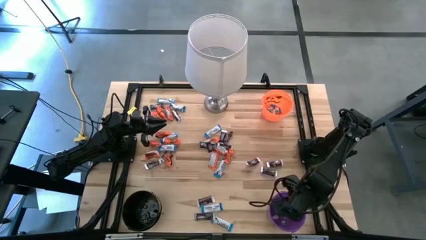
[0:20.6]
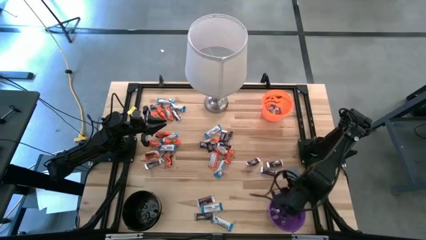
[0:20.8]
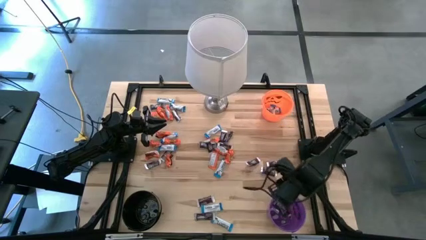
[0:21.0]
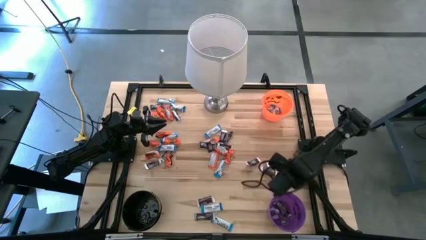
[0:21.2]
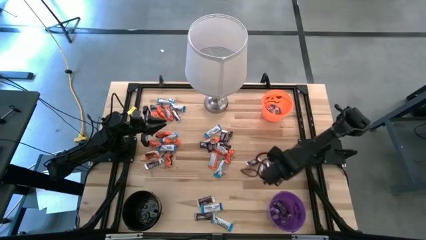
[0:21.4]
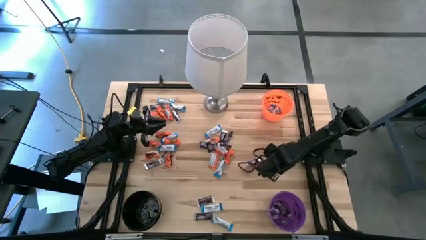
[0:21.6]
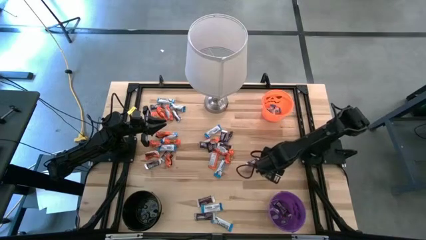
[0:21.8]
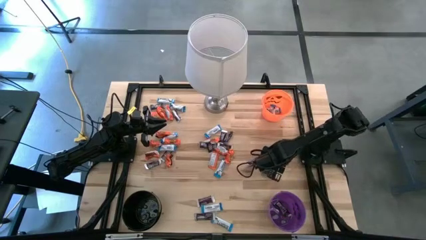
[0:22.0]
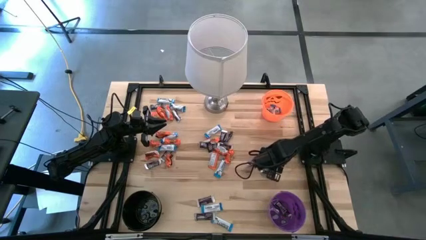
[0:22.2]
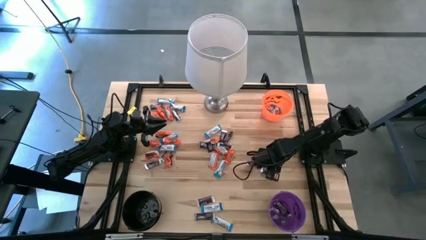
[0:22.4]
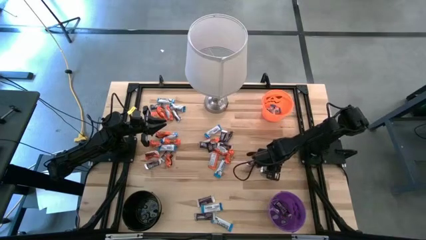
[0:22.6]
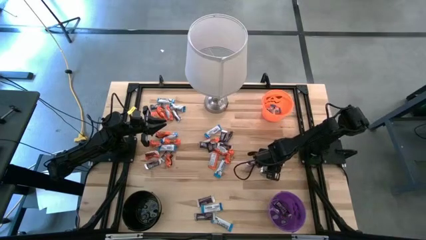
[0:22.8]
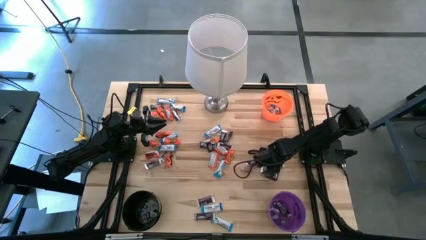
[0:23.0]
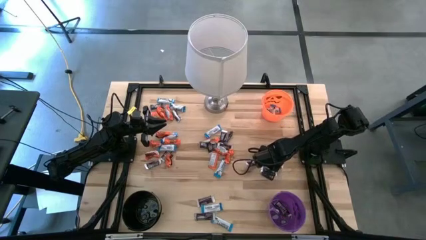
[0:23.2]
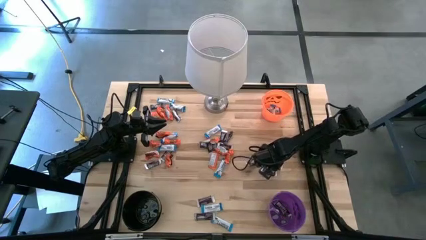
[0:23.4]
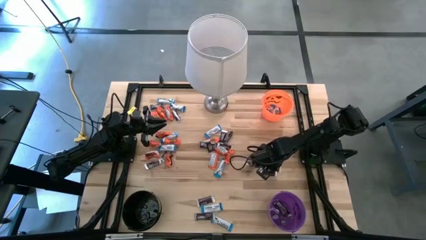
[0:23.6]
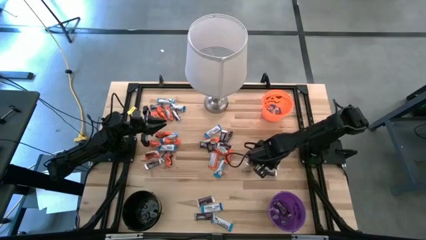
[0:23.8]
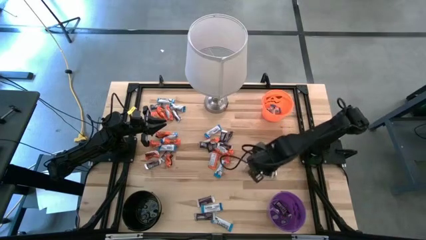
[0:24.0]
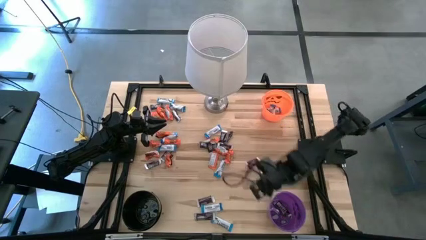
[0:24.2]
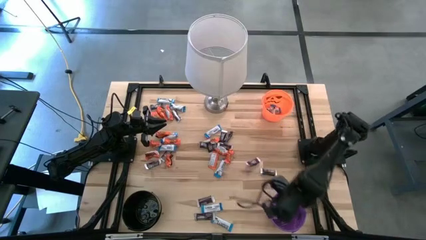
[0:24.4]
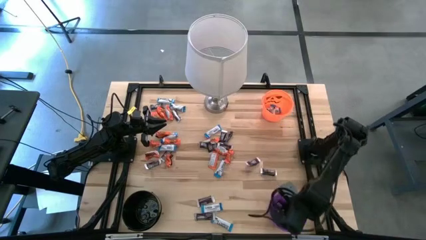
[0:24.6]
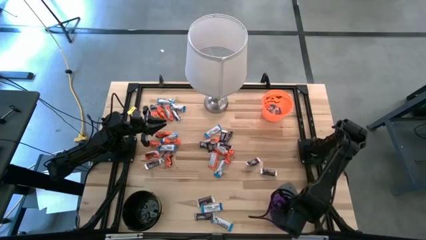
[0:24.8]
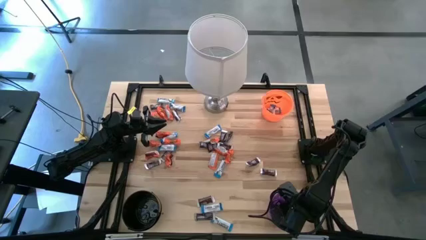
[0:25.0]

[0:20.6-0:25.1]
Task: Sort candy
Put the brown chocolate bar into the violet bucket

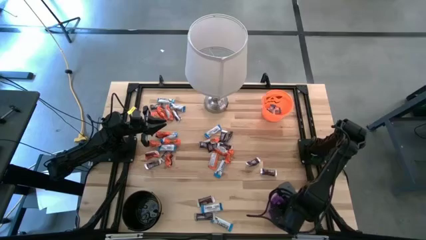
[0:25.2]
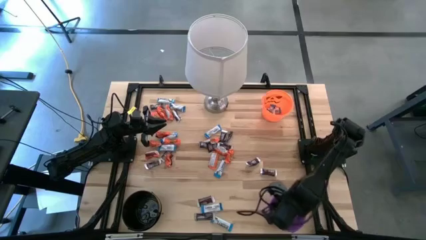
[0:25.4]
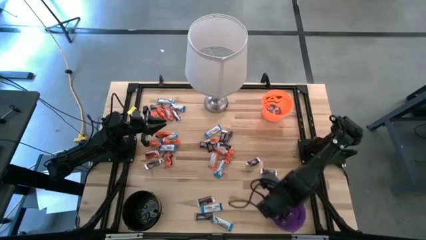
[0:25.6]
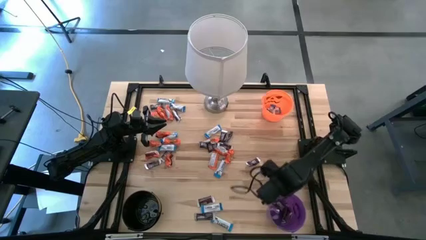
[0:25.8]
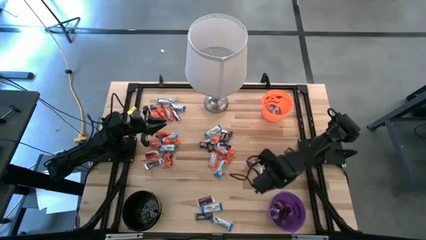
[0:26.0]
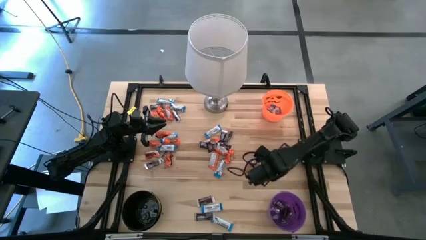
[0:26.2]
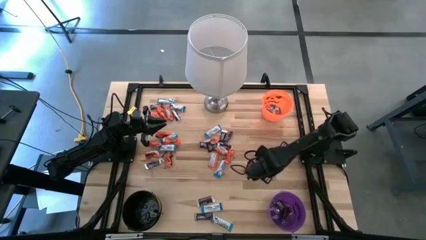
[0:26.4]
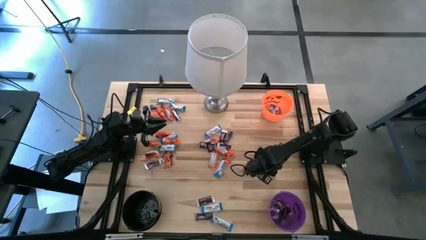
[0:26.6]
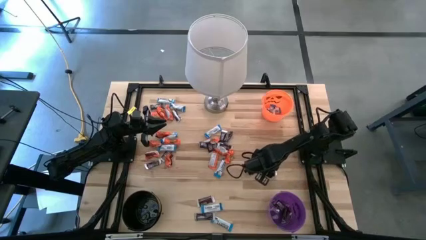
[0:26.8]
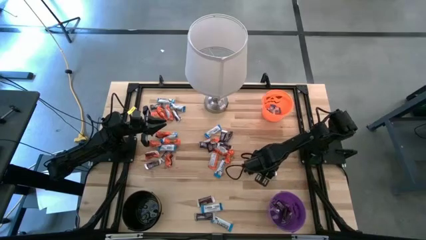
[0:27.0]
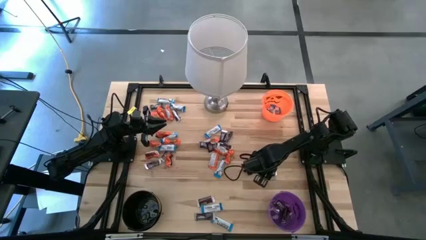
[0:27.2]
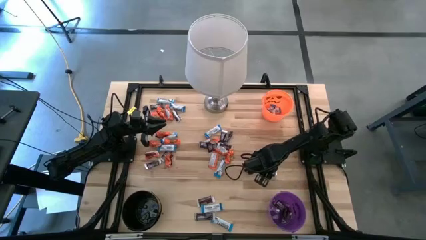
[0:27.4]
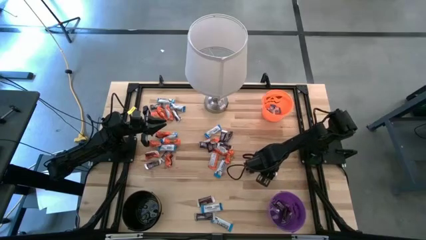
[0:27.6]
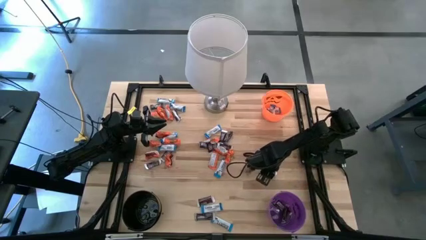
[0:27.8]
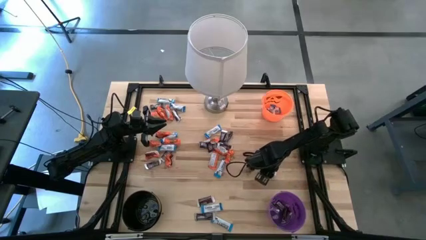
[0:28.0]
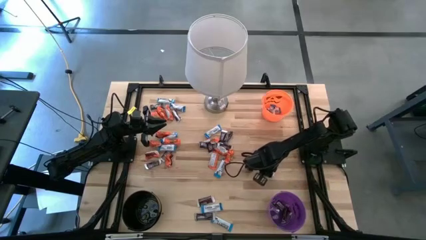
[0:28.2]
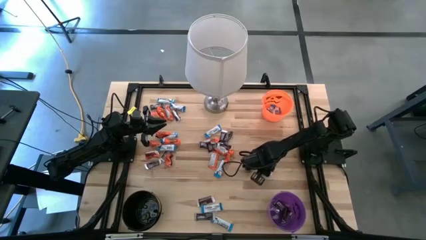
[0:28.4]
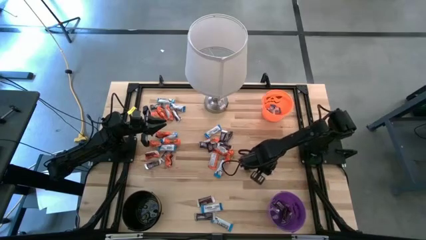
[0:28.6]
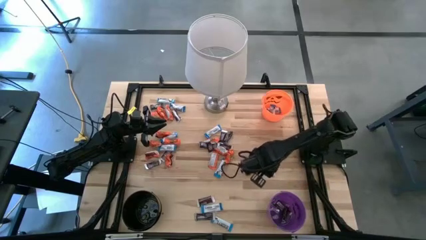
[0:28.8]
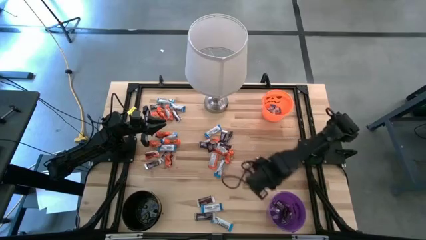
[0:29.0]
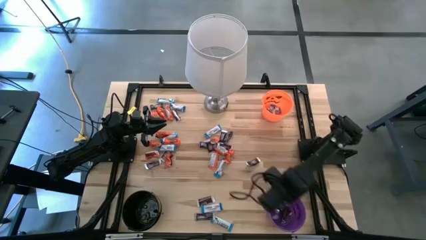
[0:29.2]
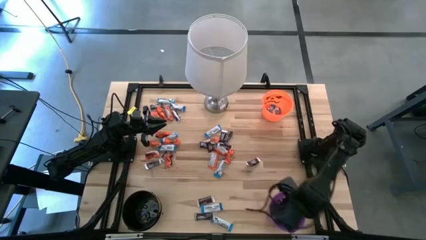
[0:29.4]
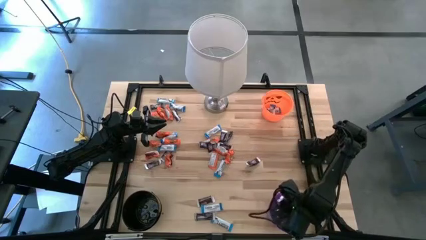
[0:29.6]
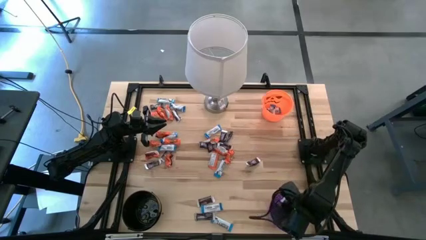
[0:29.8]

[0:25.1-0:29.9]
Put the brown chocolate bar into the violet bucket

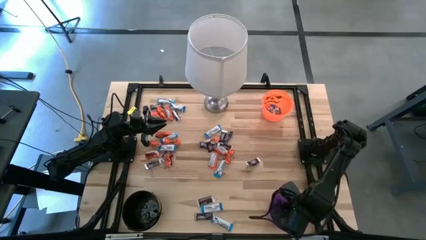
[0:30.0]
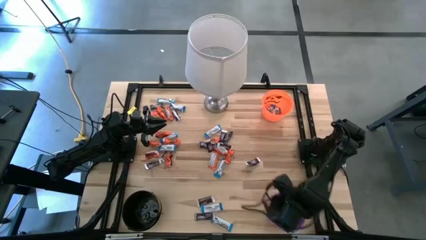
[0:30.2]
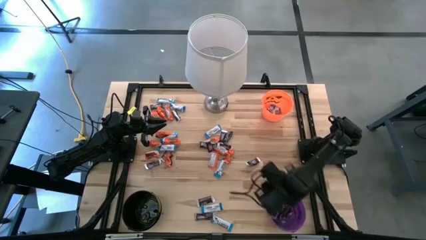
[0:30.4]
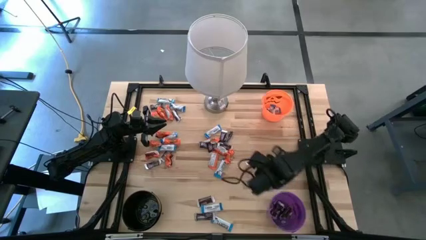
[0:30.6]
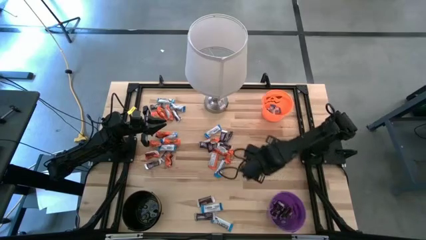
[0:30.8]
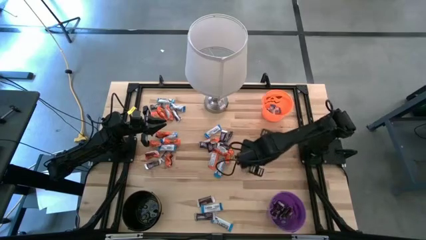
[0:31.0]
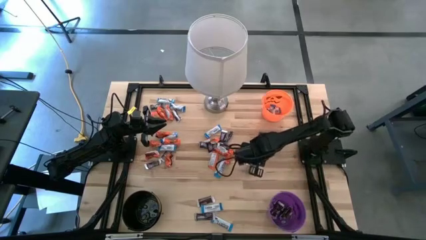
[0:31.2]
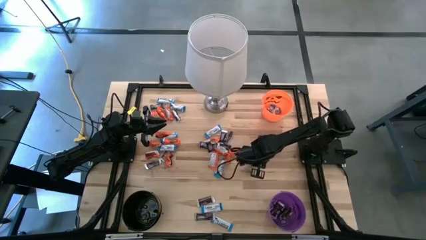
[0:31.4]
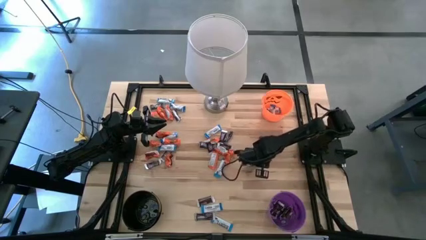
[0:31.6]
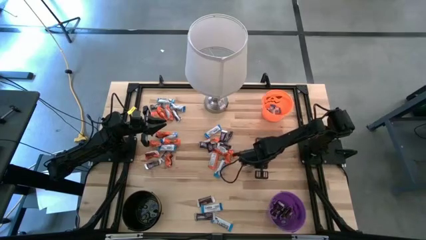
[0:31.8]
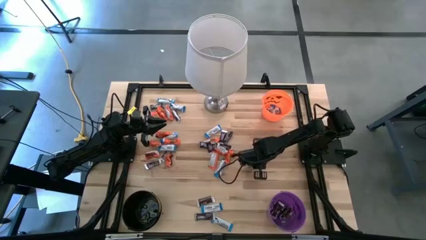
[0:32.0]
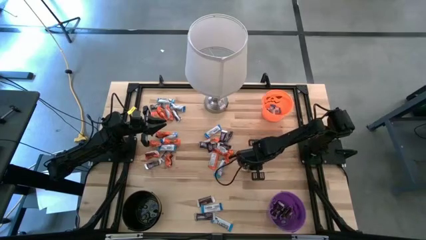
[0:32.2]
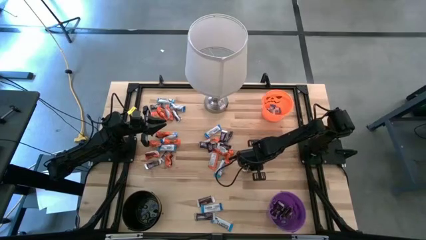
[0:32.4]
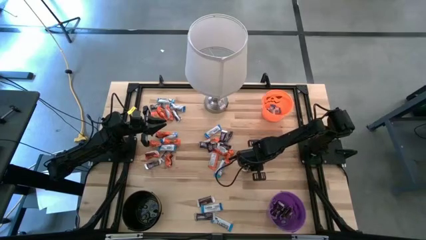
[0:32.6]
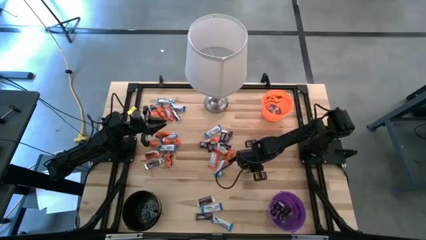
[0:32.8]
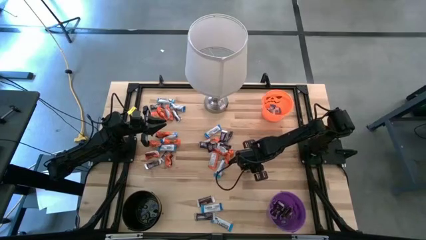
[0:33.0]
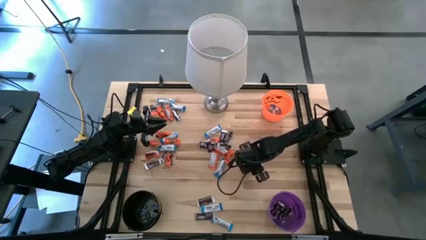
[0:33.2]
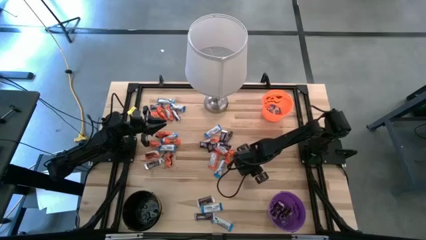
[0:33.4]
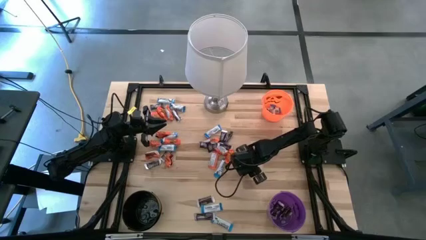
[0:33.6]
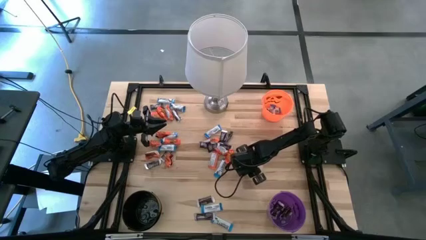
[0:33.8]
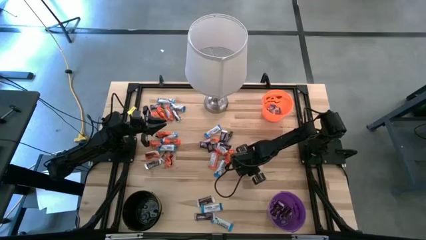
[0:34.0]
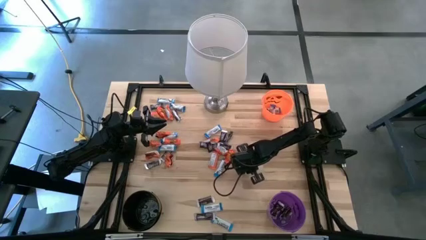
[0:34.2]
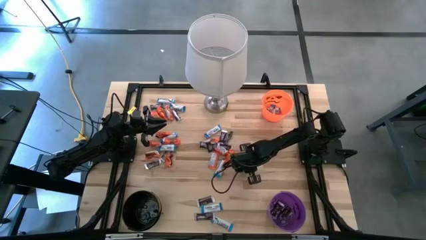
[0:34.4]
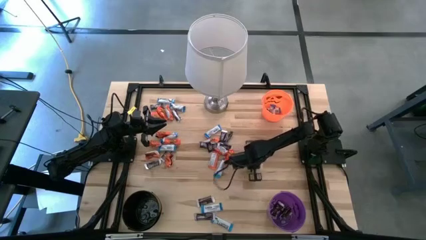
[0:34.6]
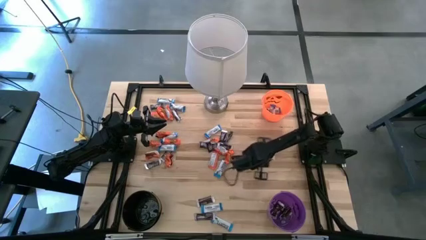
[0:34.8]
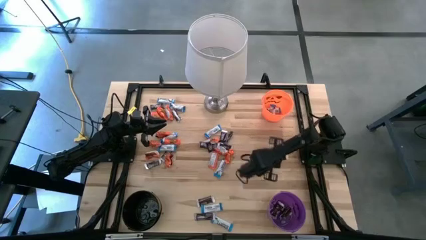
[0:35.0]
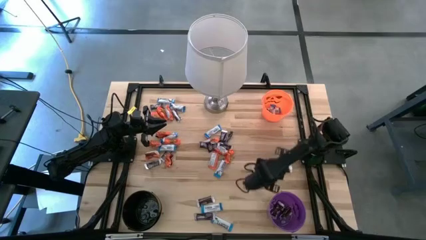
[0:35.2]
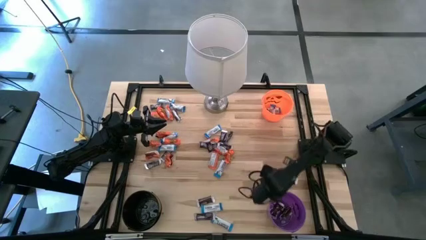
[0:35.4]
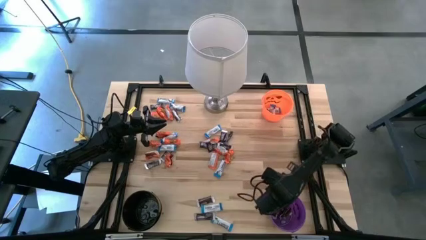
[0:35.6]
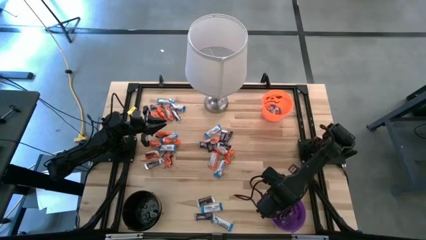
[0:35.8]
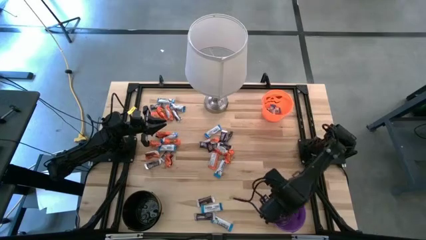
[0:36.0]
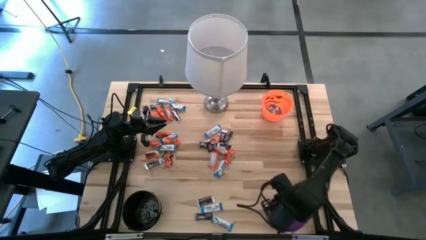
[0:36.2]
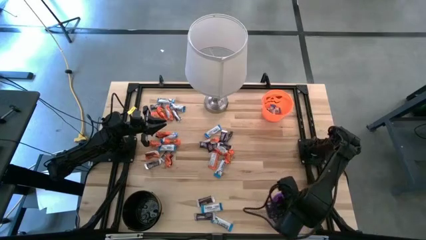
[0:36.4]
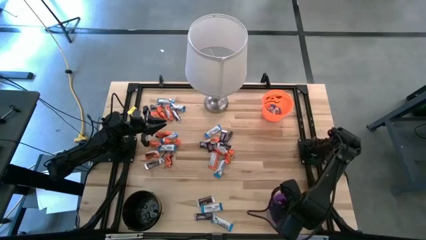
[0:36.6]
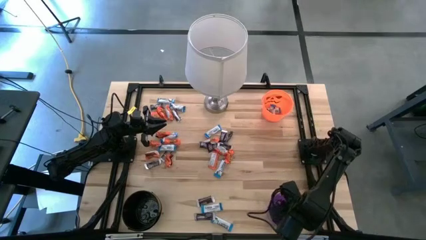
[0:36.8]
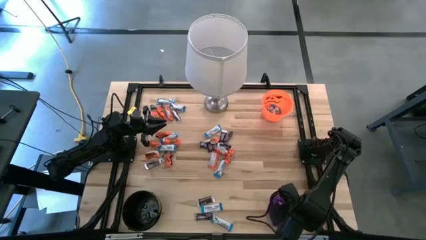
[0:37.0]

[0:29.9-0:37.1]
Put the brown chocolate bar into the violet bucket
